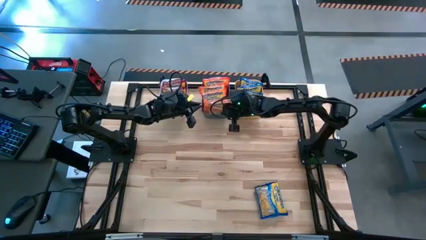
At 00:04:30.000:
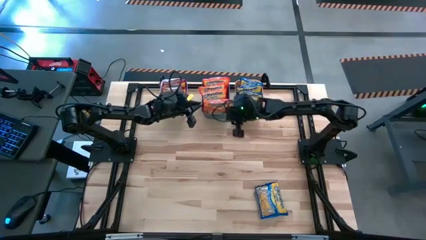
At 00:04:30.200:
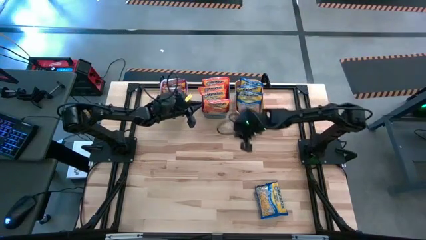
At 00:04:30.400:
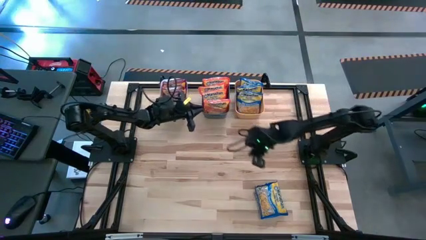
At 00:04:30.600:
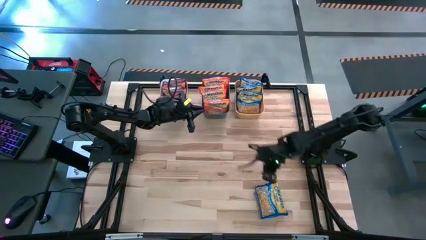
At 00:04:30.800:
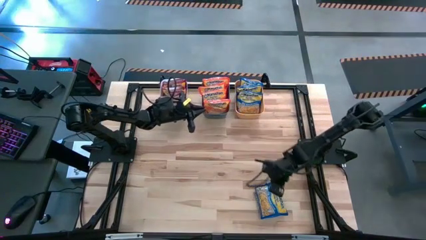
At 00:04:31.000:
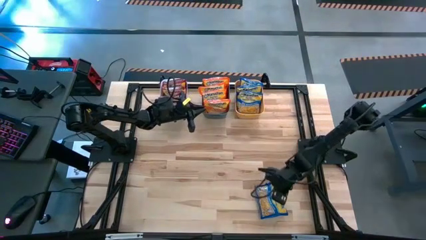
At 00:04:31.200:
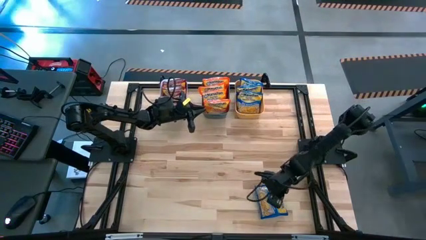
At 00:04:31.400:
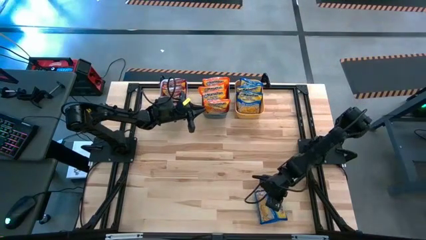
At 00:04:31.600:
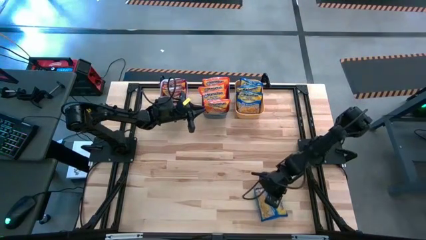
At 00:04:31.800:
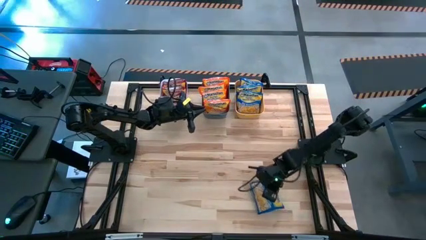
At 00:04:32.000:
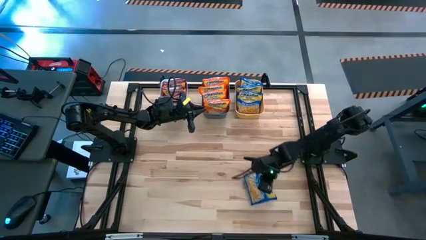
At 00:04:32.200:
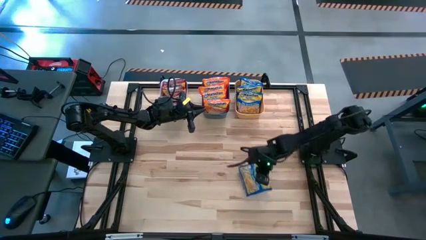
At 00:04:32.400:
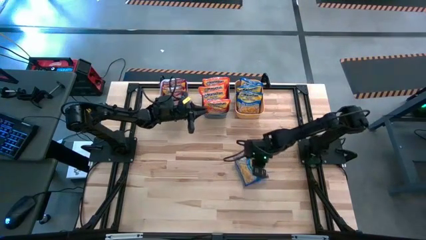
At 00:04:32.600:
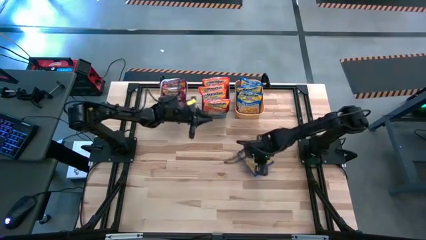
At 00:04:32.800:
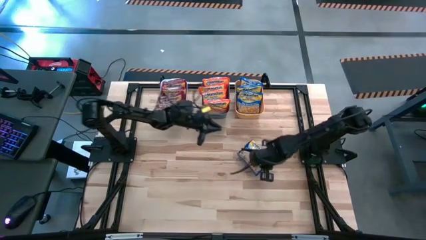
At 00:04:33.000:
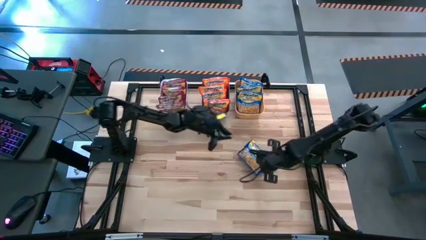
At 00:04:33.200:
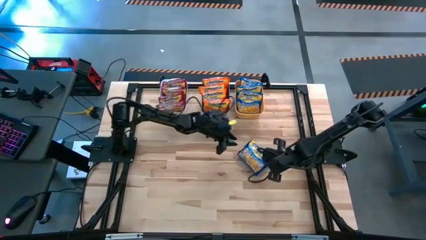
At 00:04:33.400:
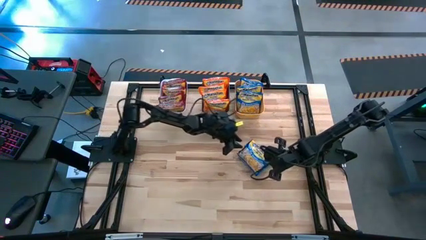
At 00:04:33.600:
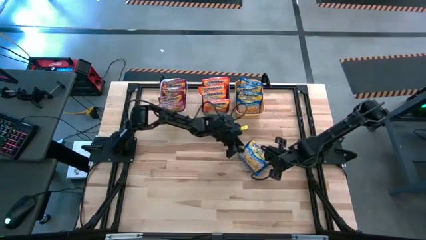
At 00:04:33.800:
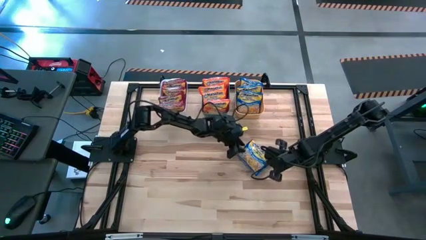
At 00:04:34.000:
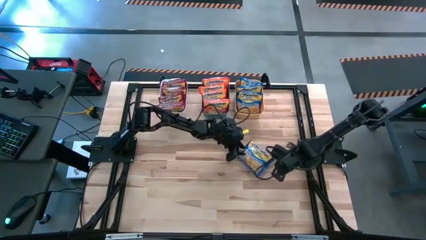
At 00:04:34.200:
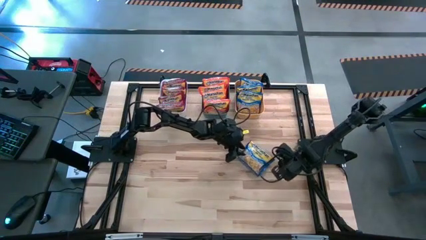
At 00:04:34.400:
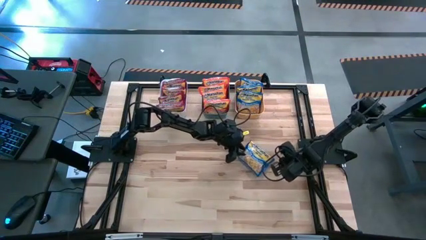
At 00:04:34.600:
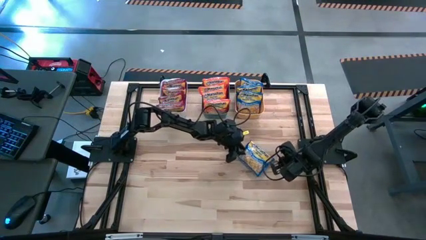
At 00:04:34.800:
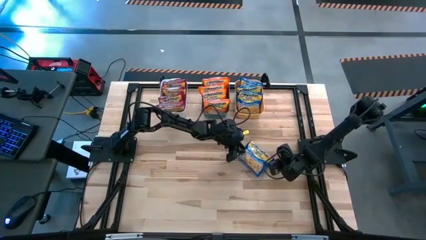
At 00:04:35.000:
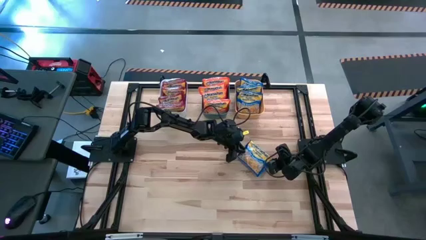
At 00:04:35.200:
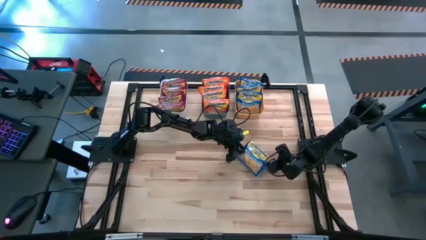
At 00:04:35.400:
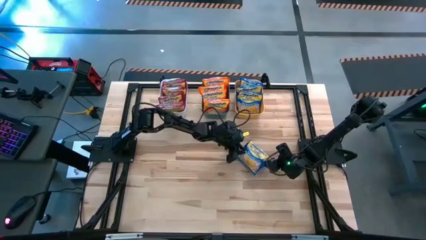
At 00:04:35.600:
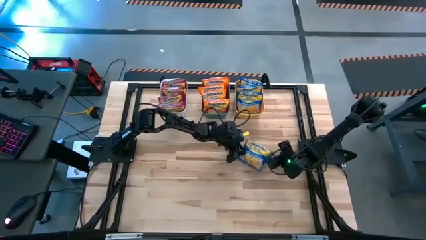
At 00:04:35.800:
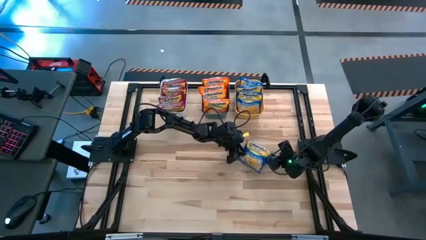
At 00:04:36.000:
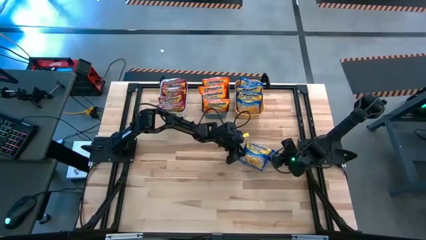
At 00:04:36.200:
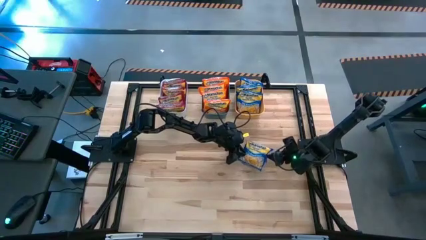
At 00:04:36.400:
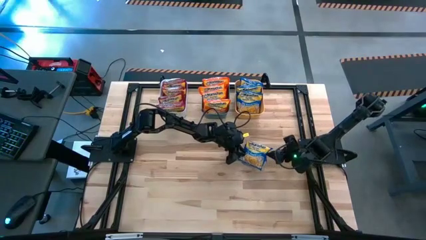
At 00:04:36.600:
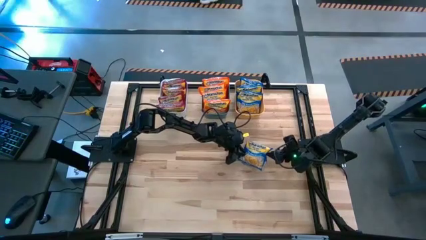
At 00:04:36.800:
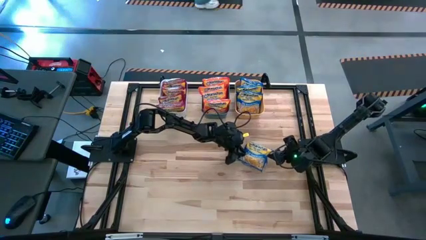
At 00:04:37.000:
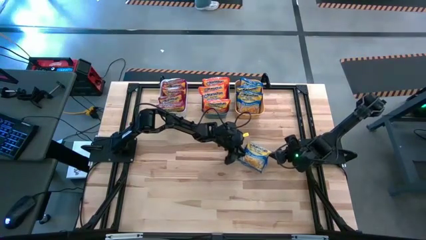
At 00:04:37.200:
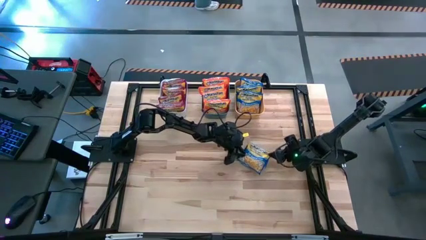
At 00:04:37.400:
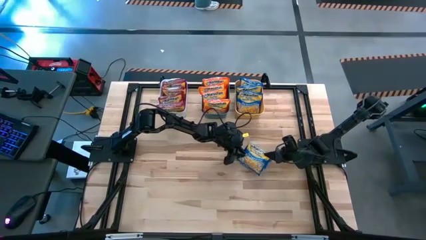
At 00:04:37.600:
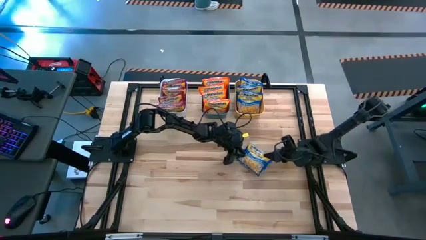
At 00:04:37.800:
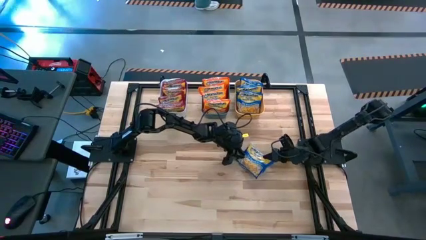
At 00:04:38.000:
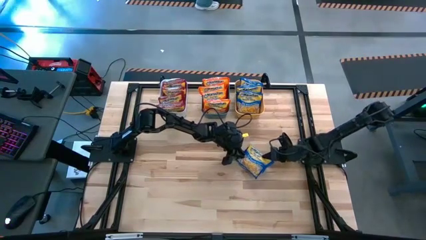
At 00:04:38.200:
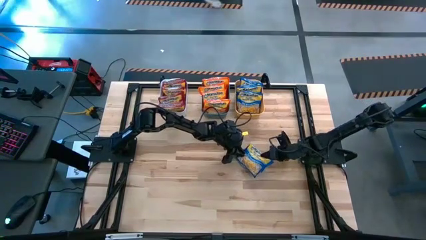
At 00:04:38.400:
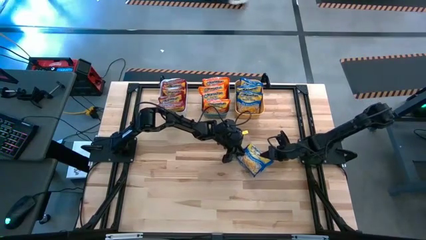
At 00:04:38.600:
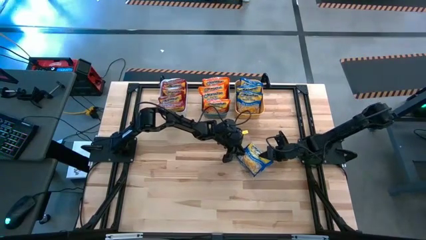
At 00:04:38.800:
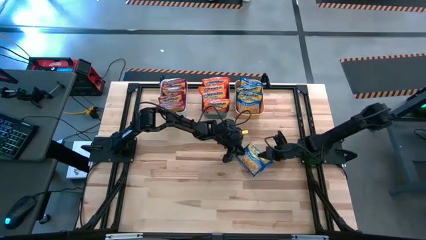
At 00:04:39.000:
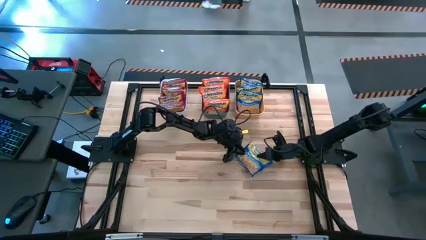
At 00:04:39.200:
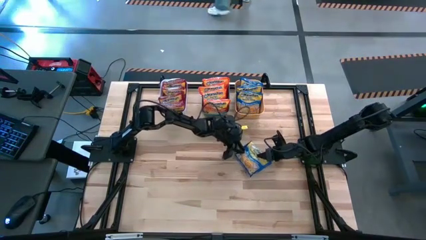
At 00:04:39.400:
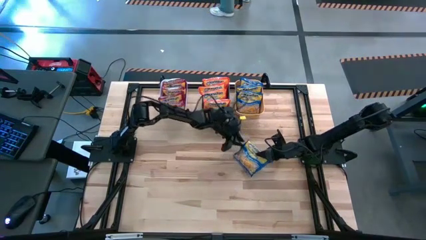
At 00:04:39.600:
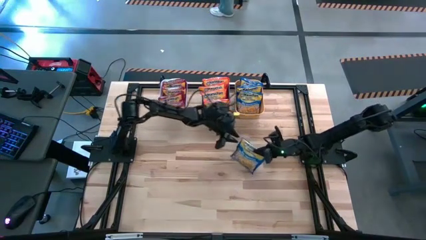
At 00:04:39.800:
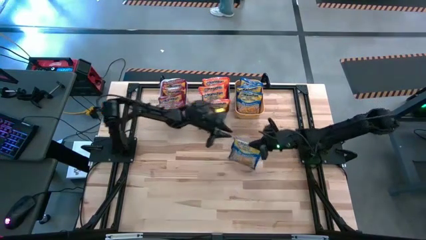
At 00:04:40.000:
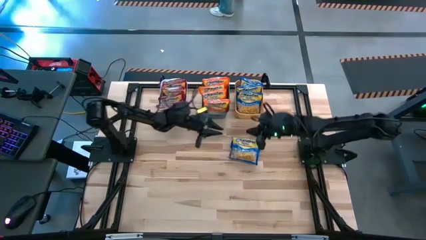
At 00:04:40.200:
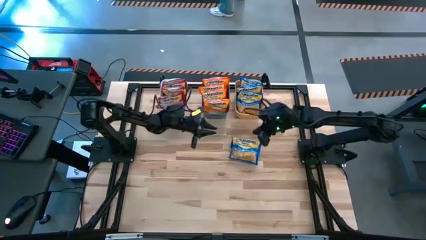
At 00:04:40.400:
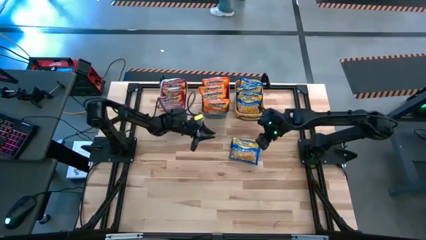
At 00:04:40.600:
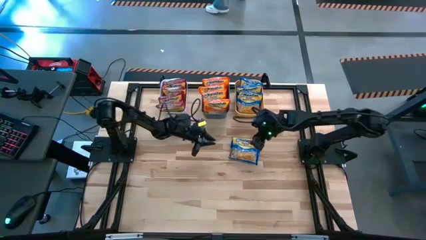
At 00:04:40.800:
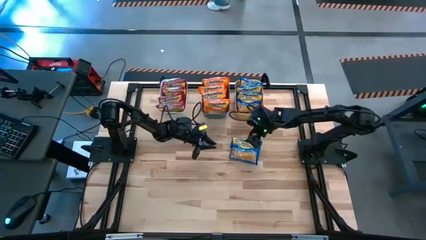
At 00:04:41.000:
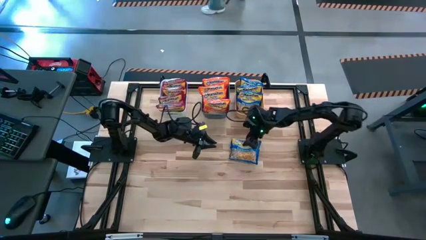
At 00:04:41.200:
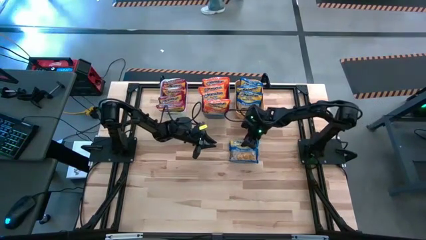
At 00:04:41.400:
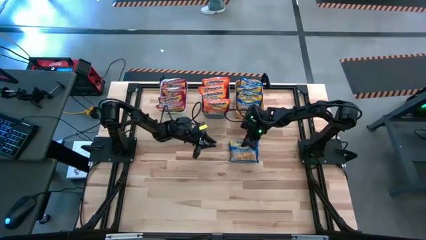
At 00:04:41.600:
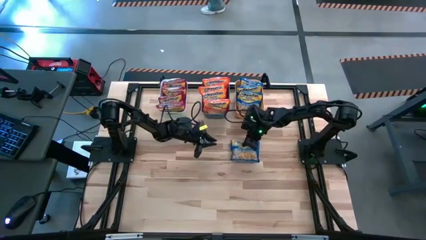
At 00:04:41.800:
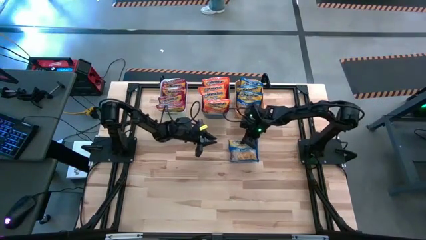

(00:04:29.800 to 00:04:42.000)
Task: Sort Maruchan noodles
Put the blue noodle pack into the yellow bin

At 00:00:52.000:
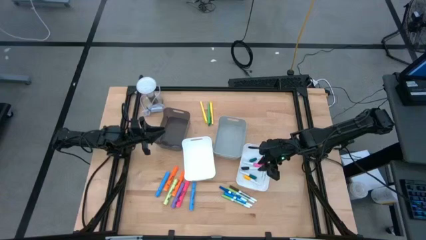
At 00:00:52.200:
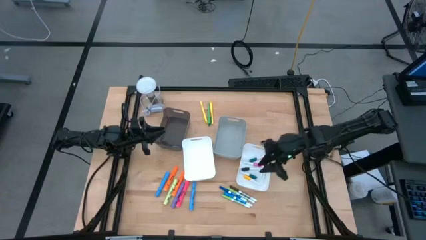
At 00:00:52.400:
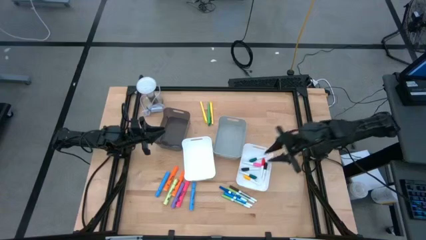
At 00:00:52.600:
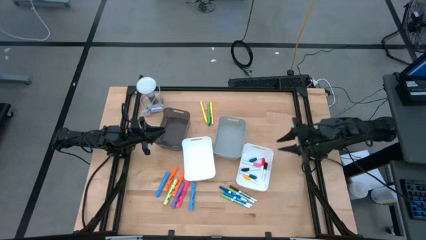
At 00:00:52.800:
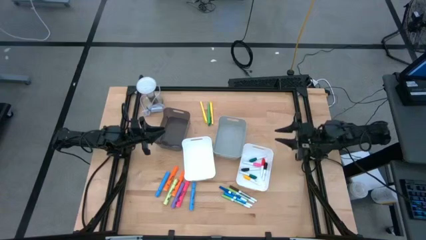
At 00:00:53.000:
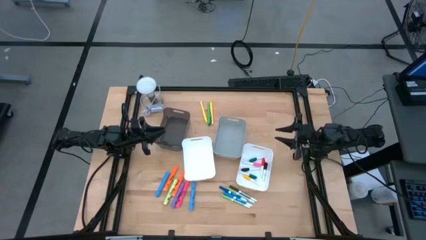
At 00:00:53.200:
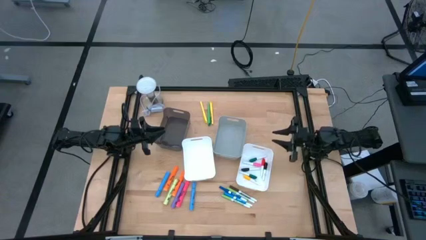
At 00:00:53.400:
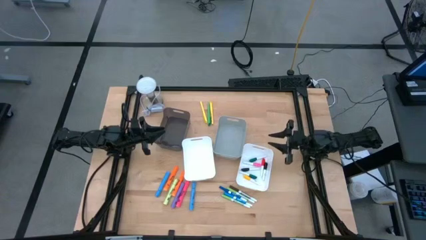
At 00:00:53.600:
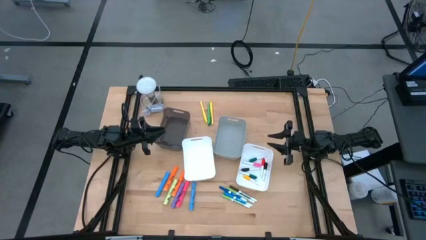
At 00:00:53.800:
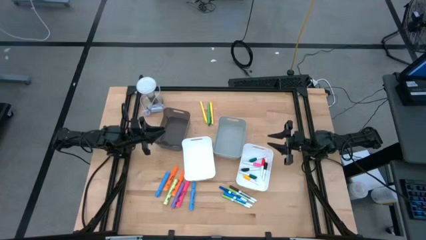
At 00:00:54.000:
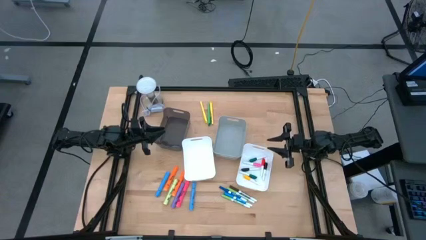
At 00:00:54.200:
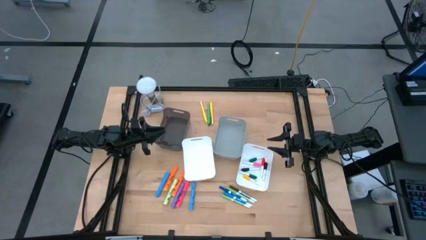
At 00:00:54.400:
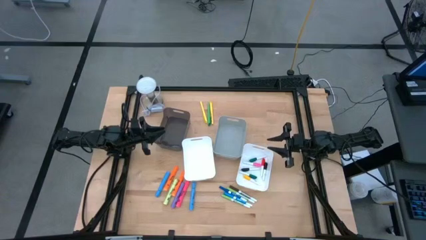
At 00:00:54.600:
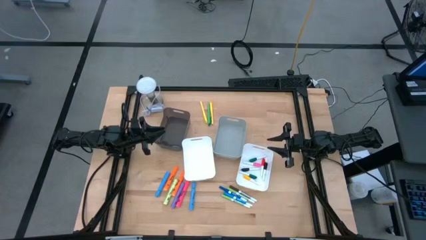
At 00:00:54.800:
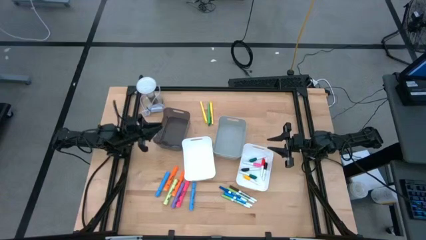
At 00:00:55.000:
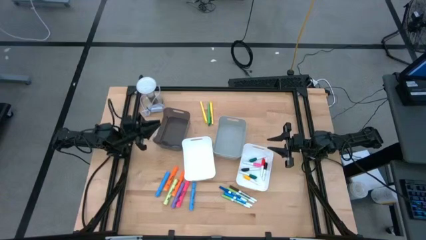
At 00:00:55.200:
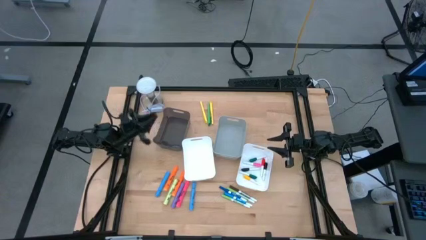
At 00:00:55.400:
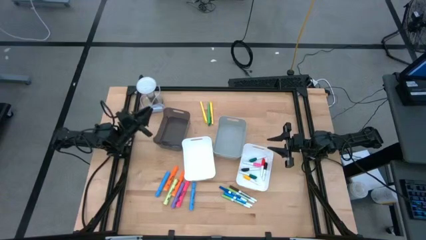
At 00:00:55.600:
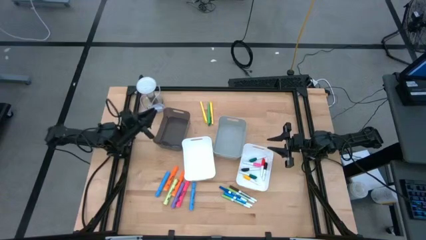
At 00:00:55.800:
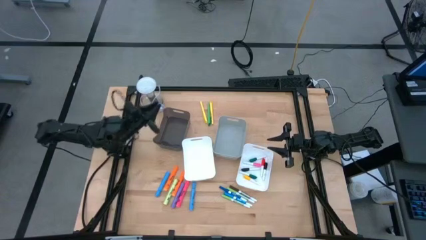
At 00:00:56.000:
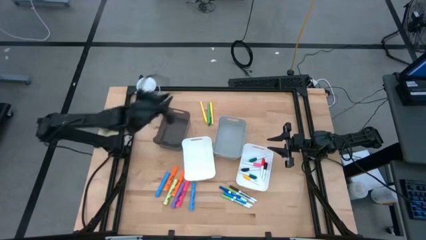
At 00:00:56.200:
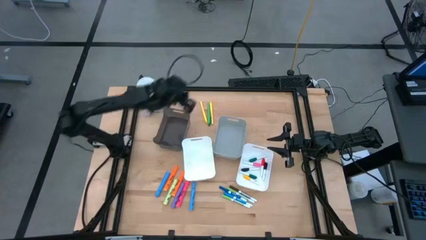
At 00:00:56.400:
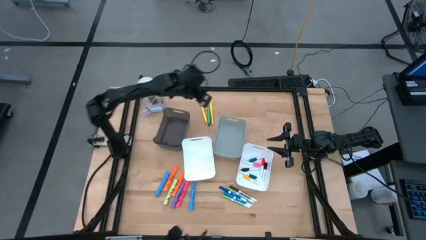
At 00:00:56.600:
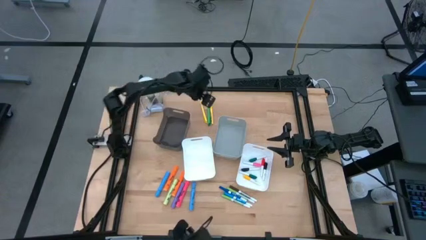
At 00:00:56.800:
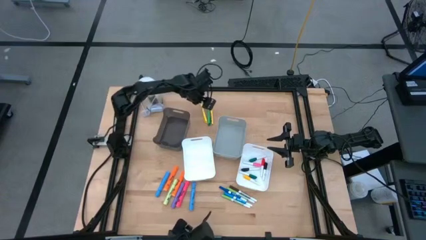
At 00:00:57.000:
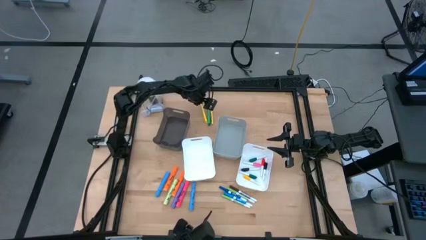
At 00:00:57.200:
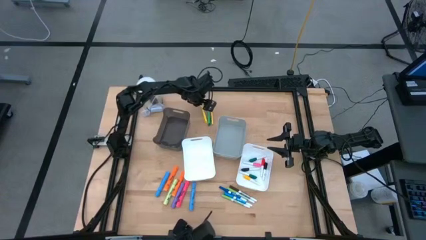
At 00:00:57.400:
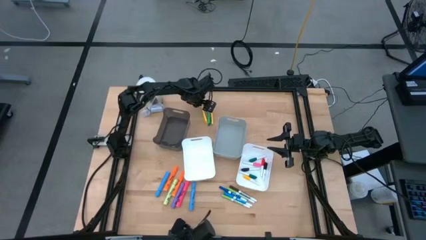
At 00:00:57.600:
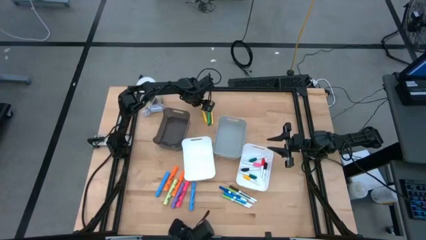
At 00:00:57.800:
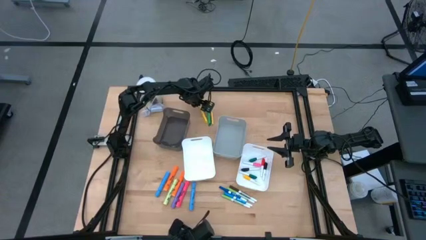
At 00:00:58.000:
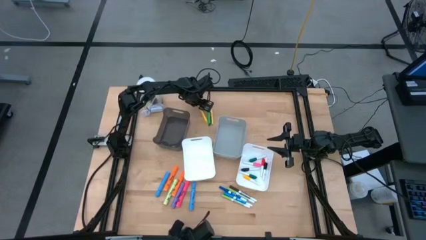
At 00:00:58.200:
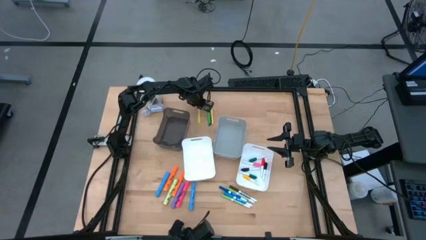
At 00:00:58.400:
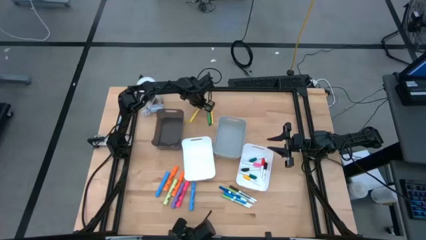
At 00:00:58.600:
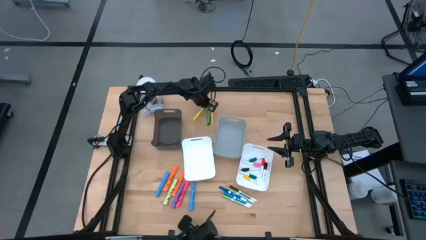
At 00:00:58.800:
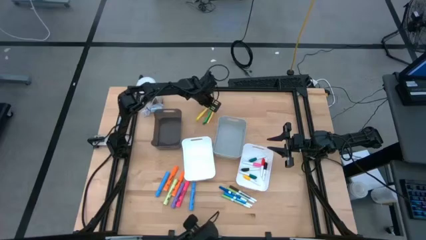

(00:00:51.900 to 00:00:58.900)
Task: Pick & Place Markers
Put the left yellow pen into the black bin
